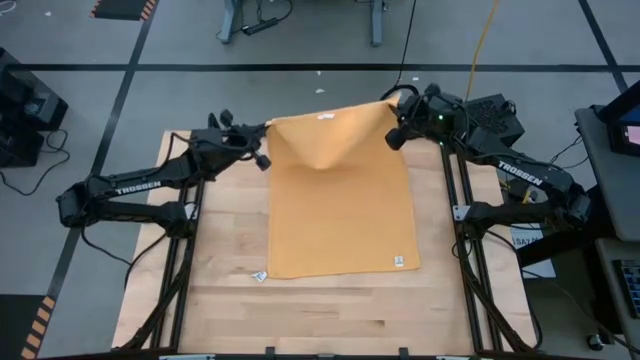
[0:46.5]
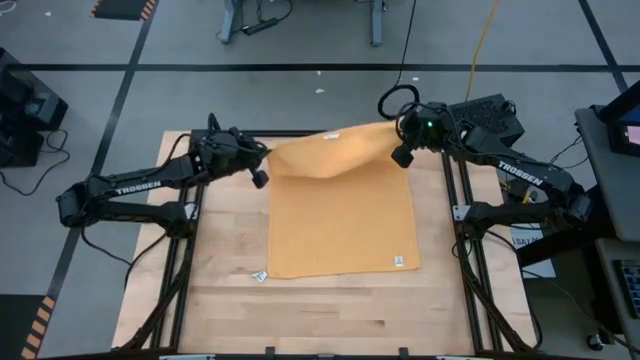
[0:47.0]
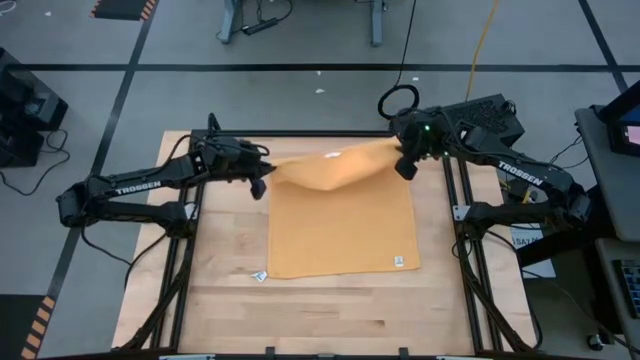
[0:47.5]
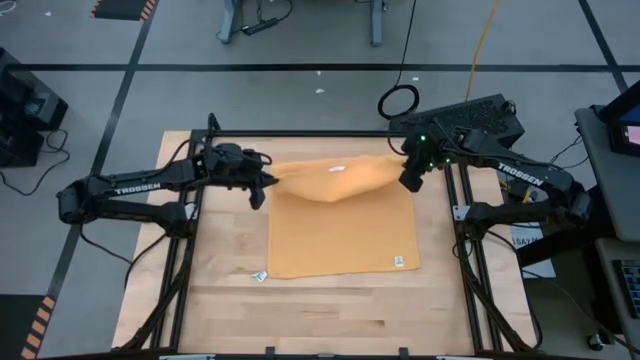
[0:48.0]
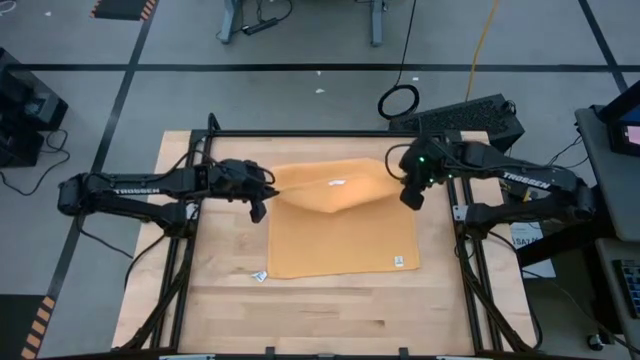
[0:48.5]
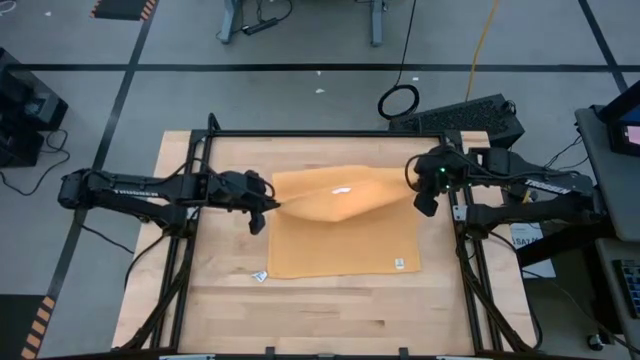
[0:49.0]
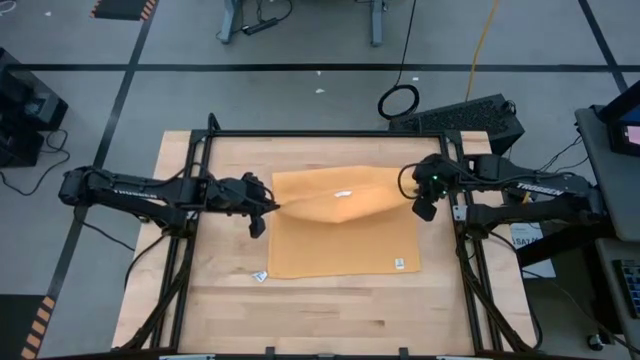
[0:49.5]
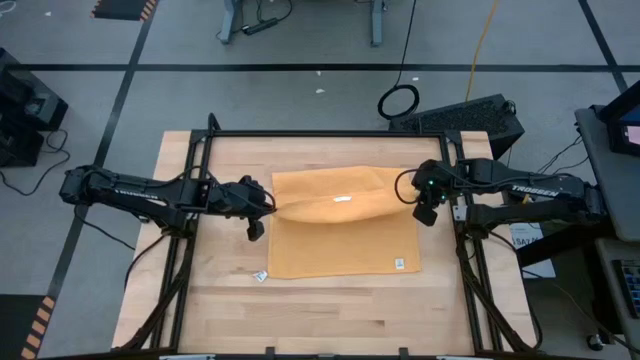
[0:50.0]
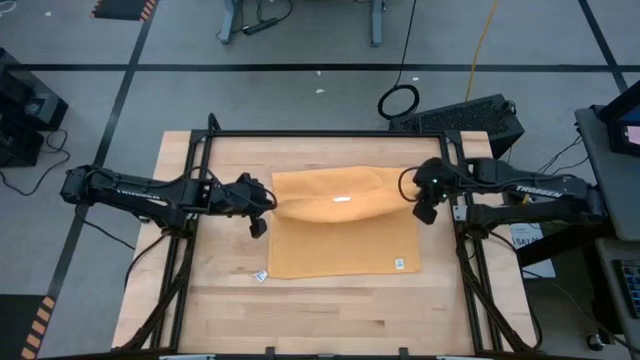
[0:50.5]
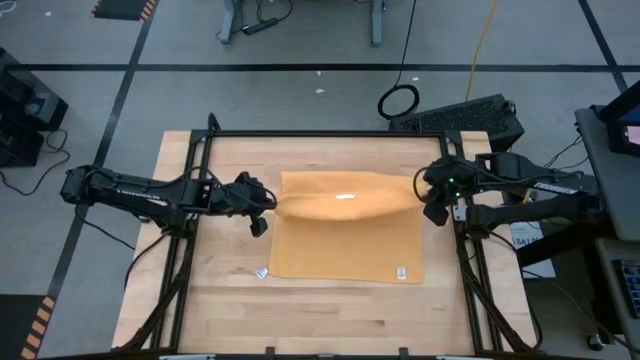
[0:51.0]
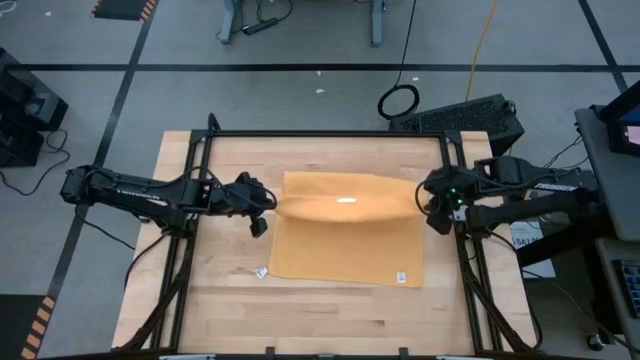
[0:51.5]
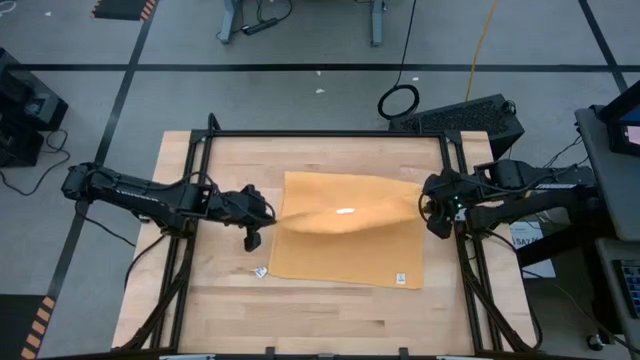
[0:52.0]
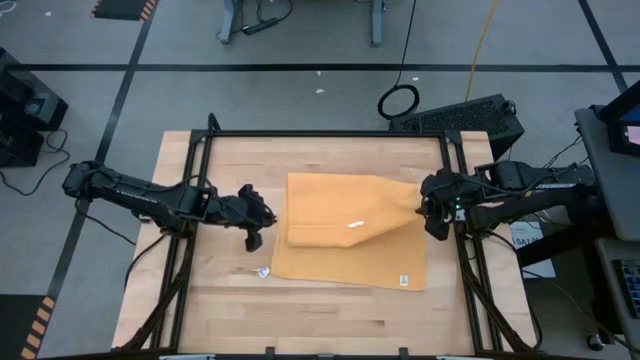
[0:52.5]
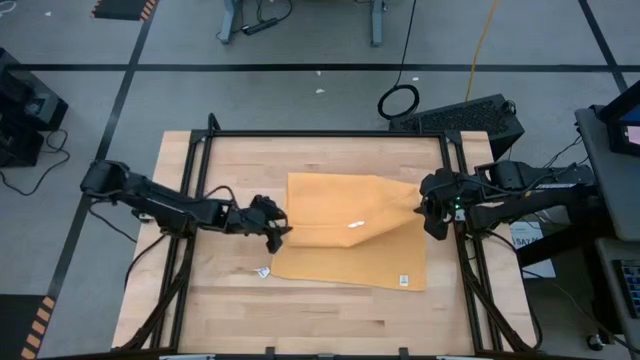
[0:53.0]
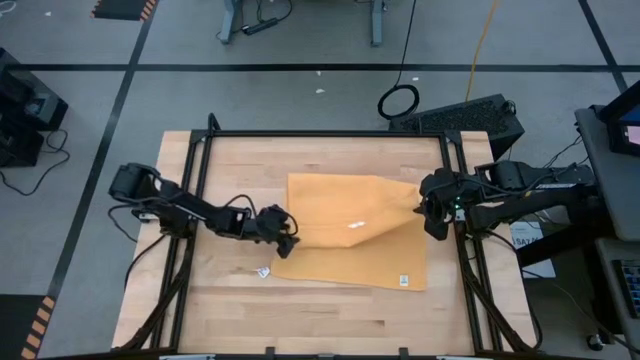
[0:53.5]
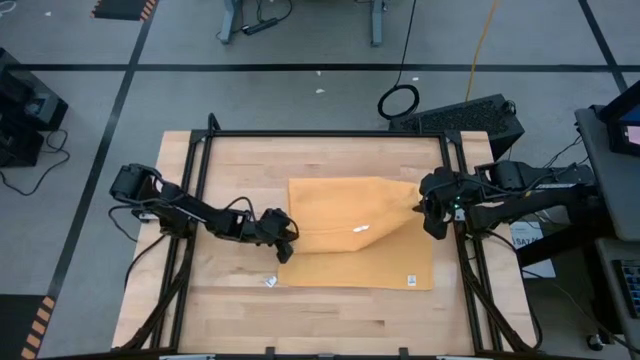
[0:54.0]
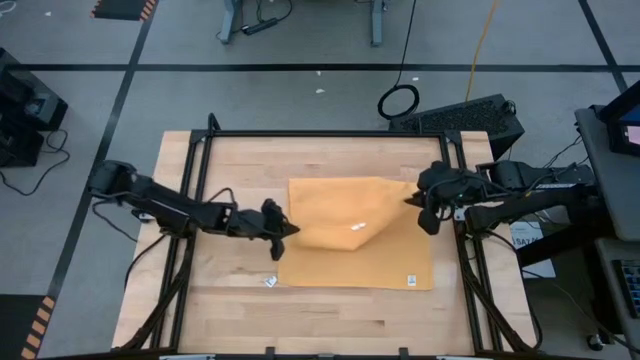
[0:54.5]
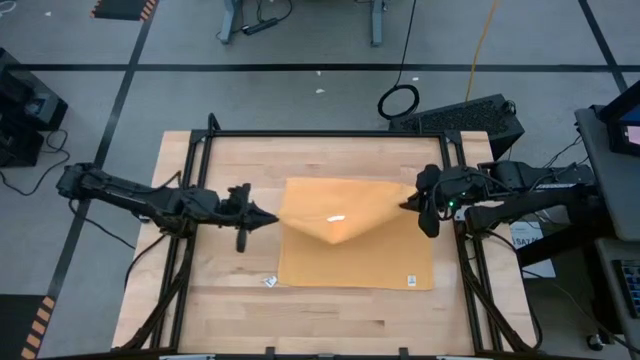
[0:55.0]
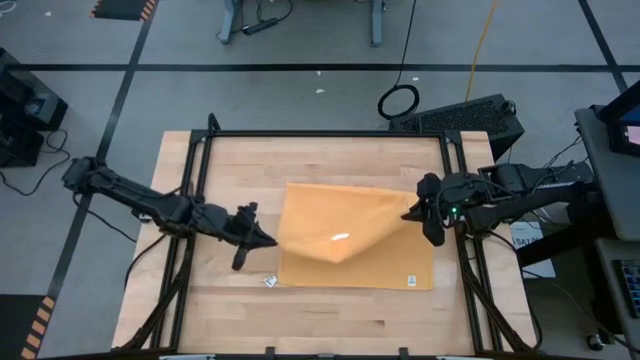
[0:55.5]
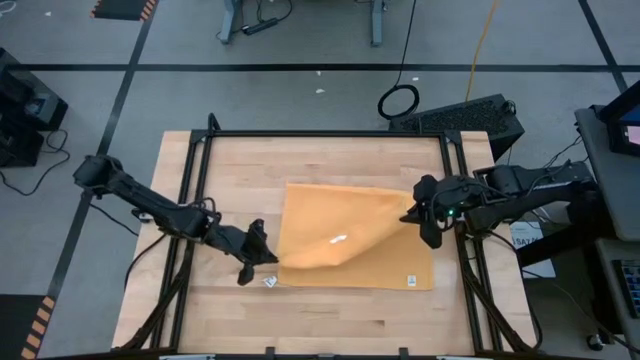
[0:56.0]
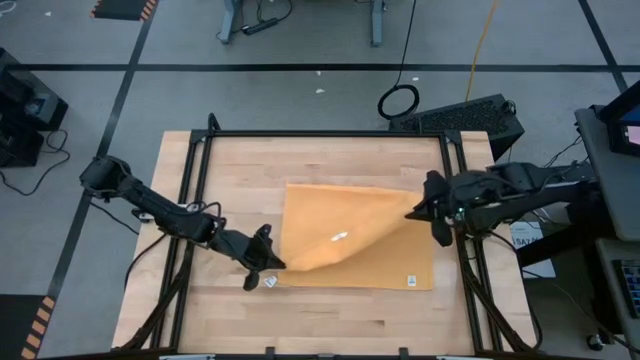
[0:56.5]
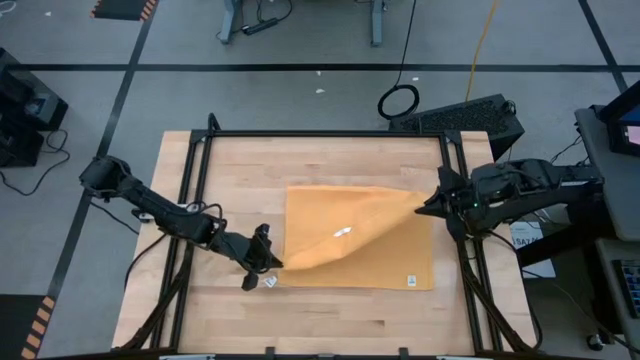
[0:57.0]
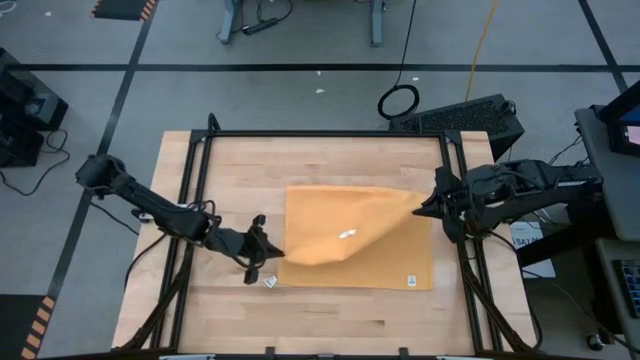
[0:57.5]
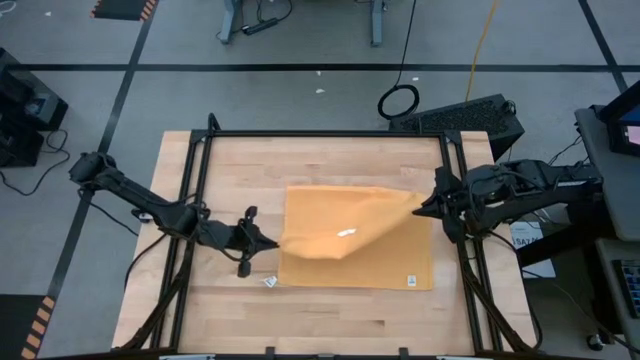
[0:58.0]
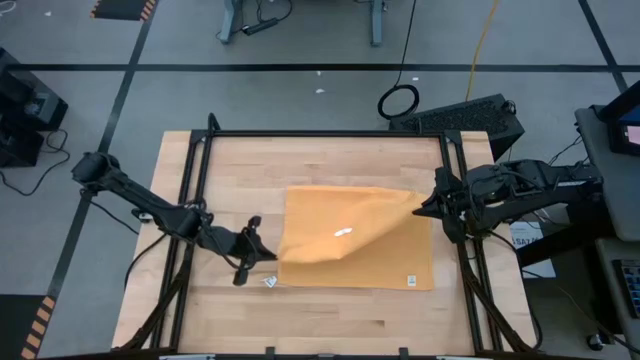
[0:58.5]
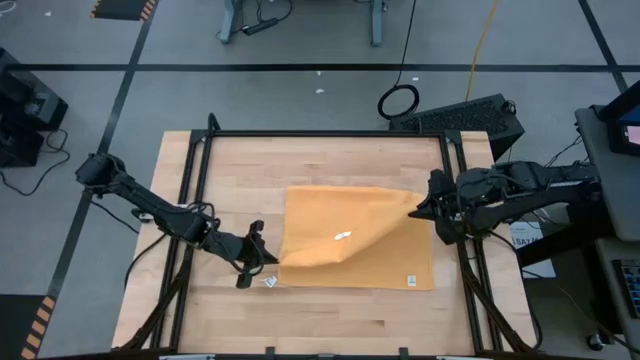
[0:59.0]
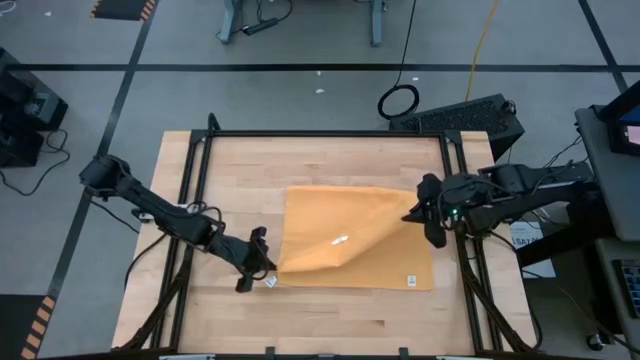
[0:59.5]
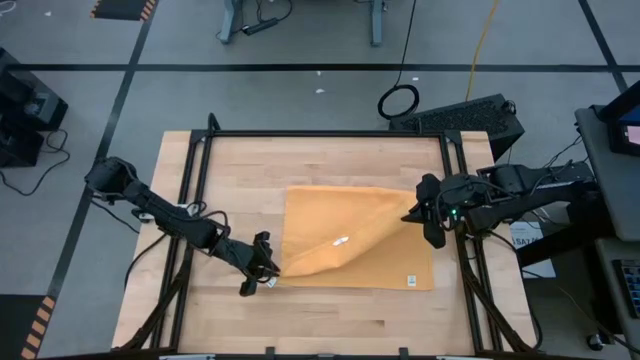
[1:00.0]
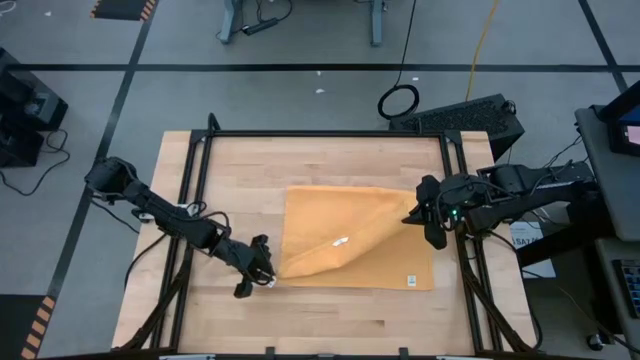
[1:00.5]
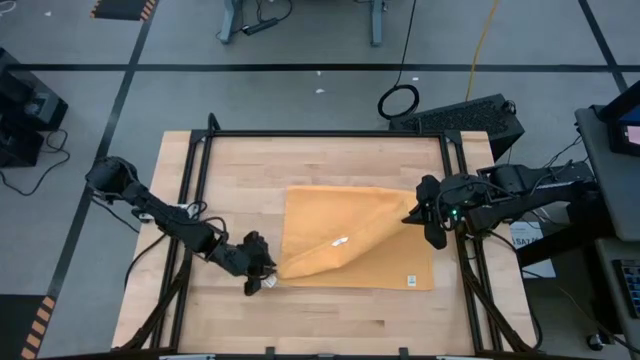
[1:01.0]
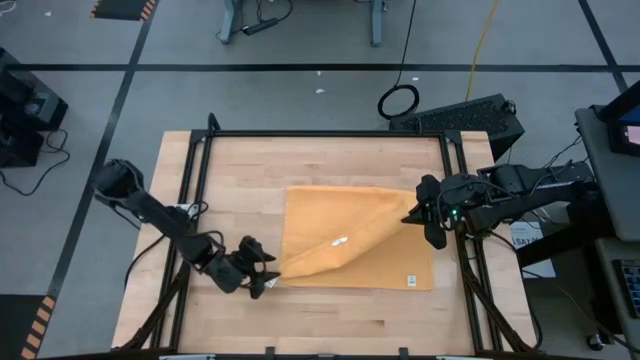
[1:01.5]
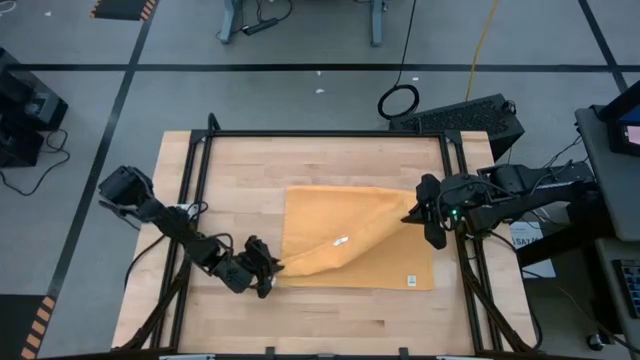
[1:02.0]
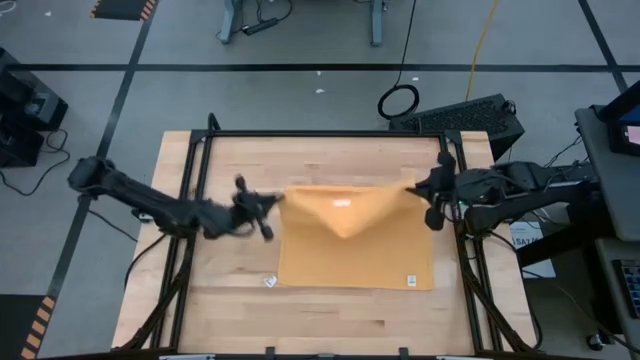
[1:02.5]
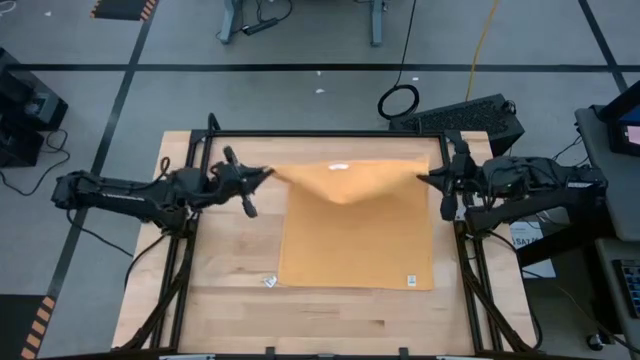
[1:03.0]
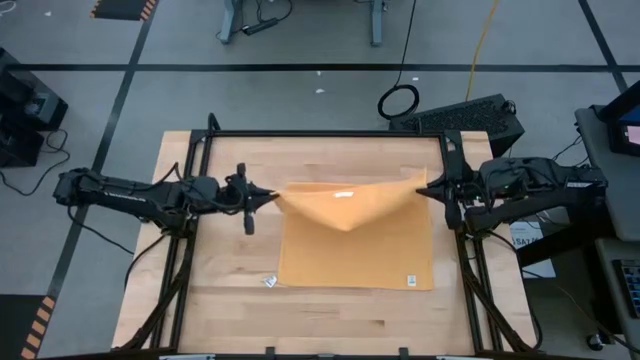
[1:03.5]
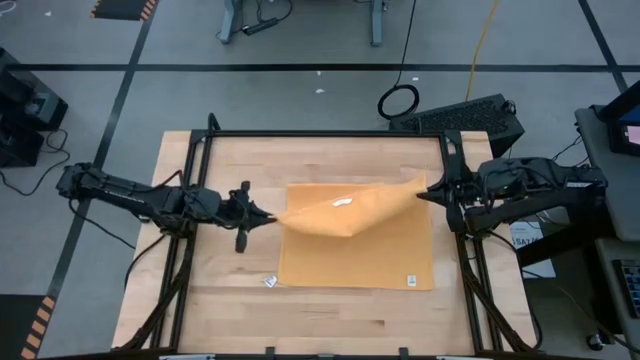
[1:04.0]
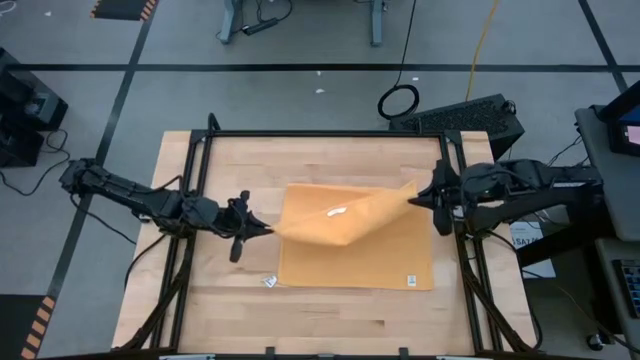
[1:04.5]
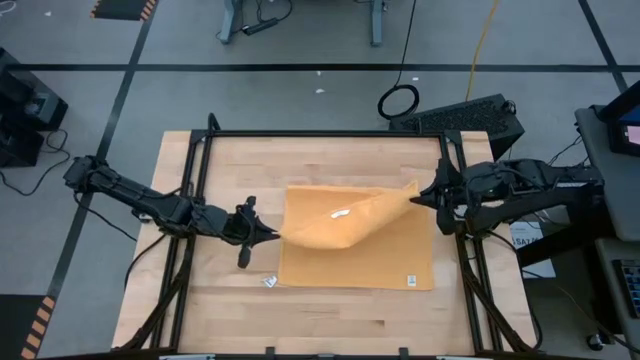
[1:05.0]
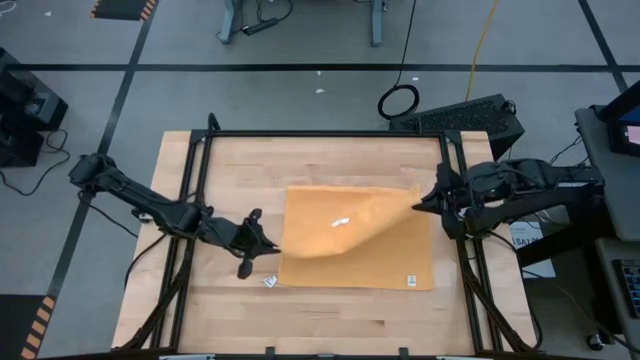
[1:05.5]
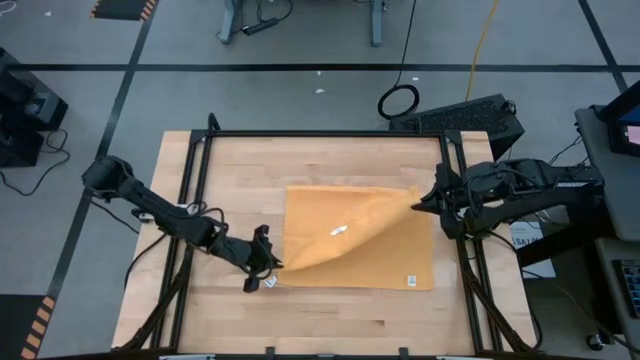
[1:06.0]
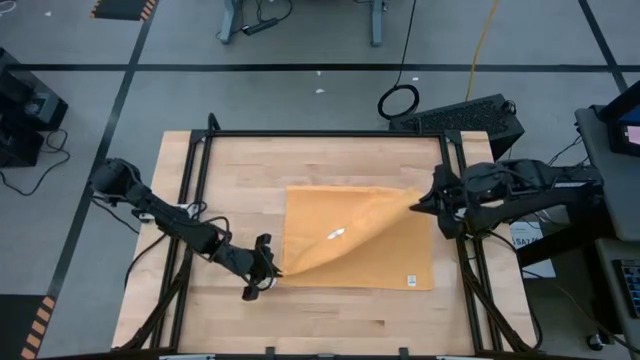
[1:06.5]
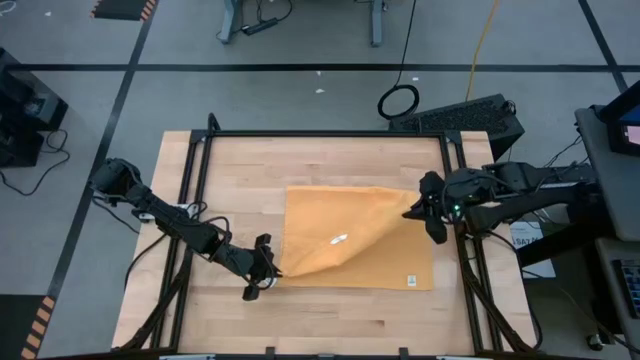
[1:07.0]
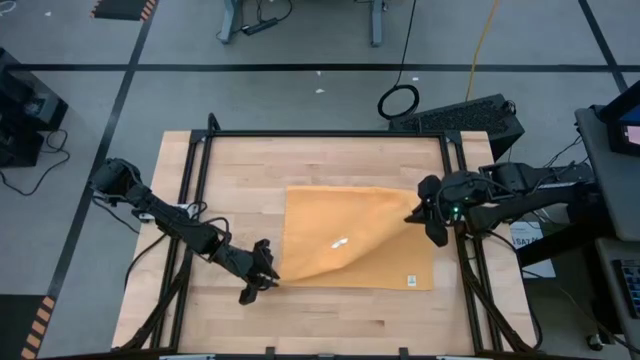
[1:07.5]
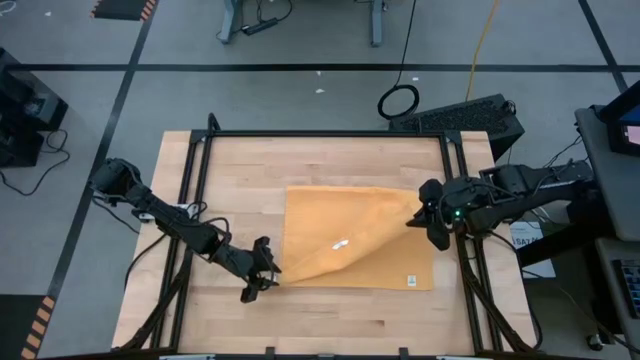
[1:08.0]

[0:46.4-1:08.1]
Task: Roll towel
Fold the yellow towel in
